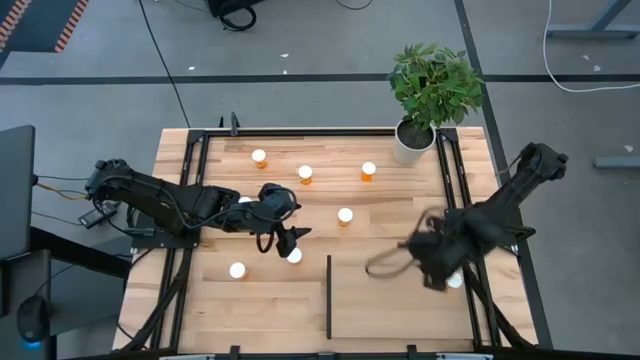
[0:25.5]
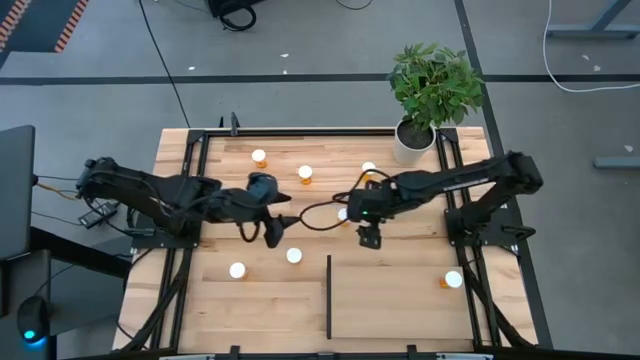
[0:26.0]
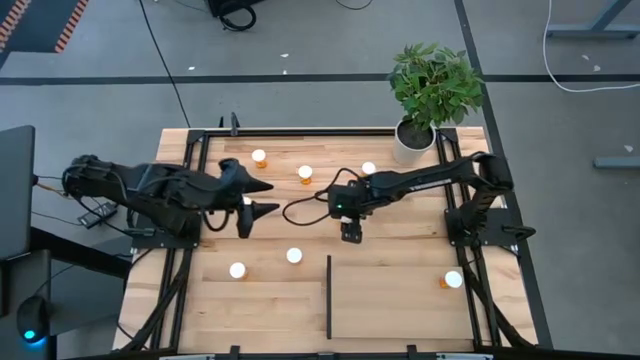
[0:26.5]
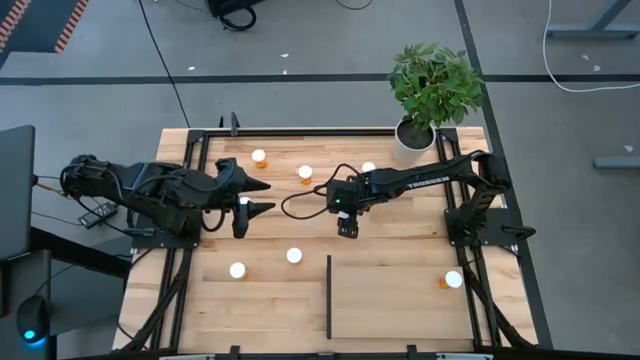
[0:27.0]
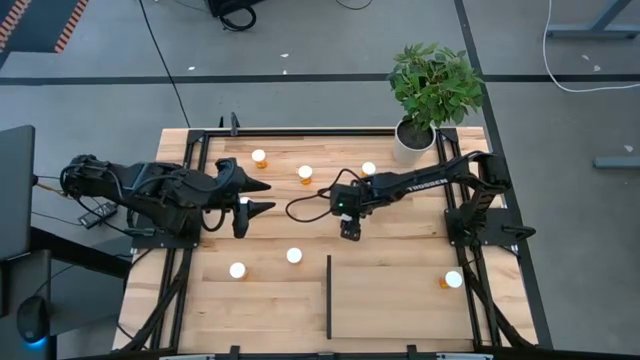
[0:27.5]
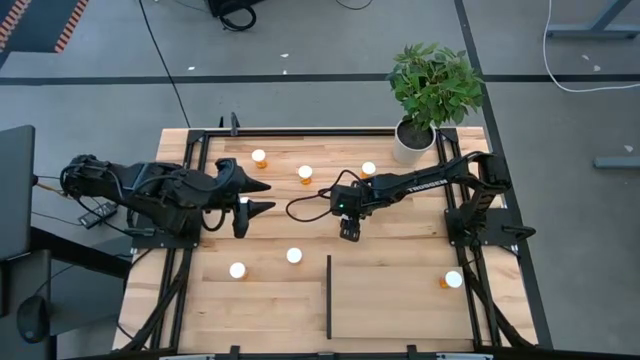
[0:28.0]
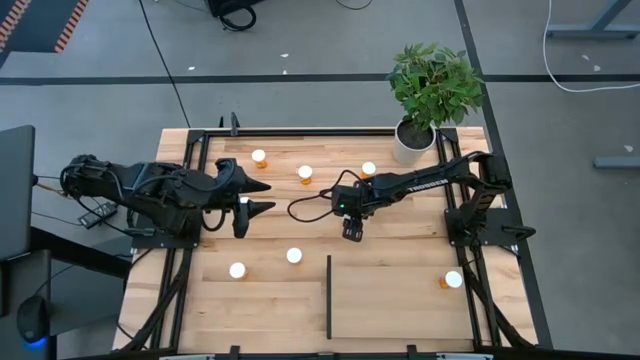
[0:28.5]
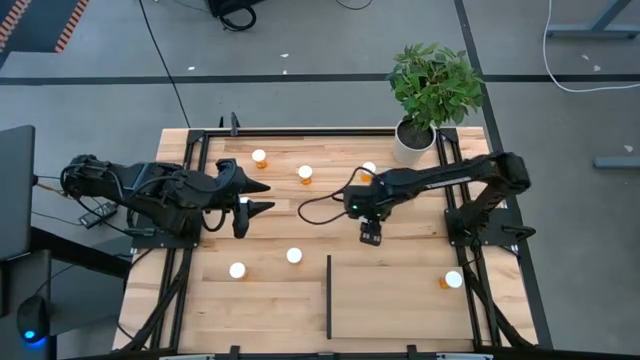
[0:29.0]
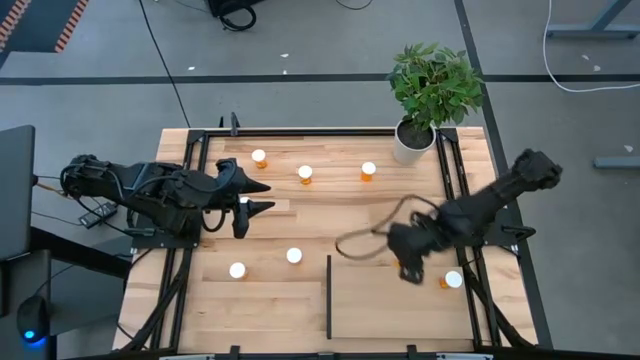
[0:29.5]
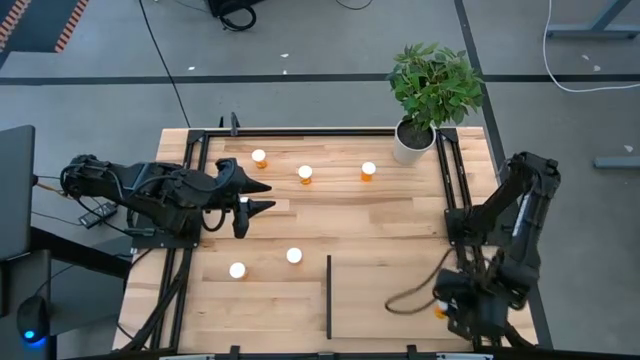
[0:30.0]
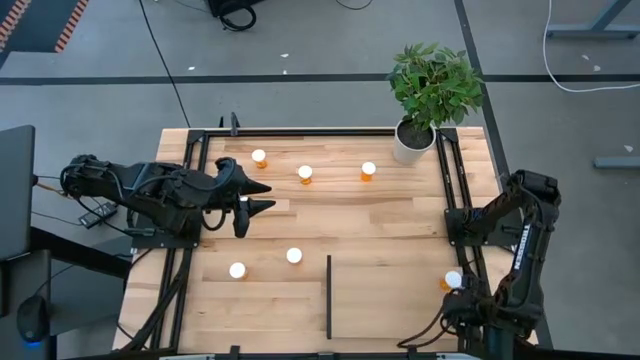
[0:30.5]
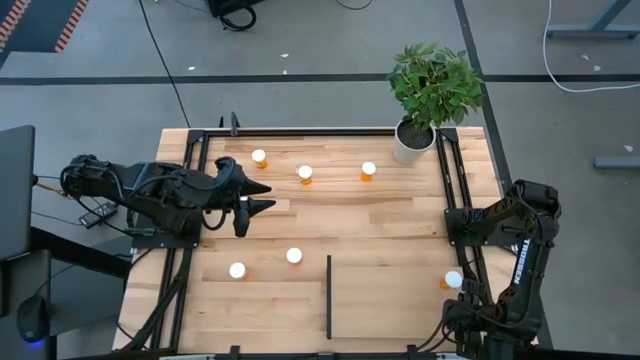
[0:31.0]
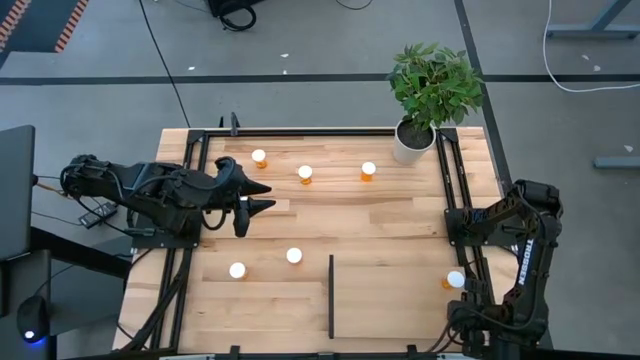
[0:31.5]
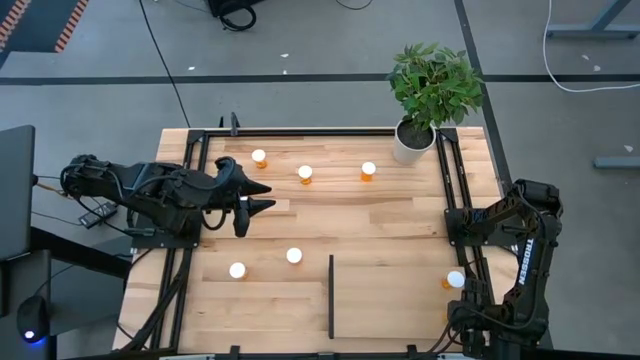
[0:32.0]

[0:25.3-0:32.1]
Task: Pick and place medicine bottles onto shelf by color
Put the orange pill bottle on the shelf aligned with the other orange pill bottle

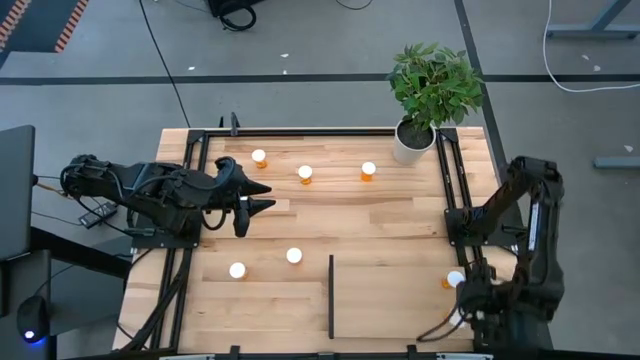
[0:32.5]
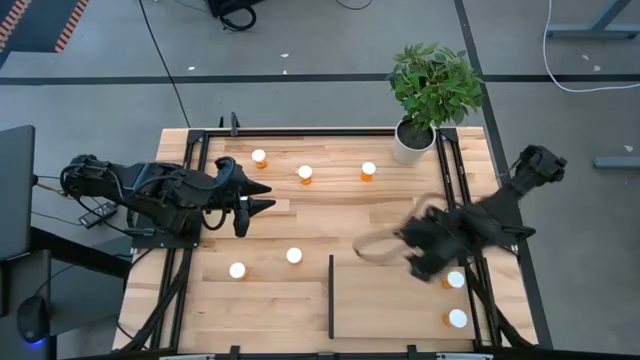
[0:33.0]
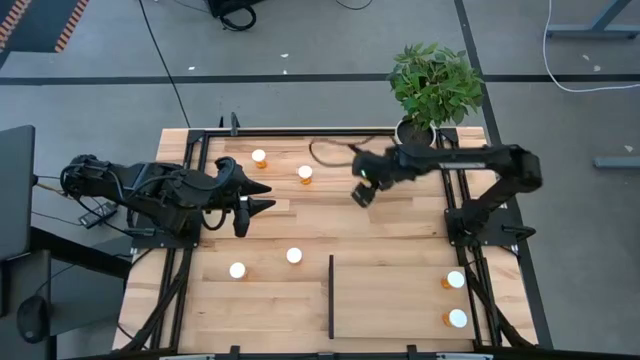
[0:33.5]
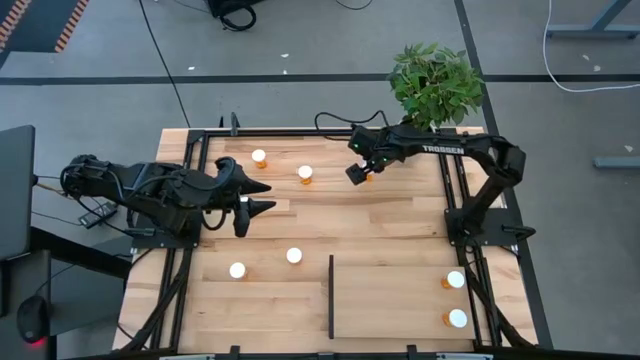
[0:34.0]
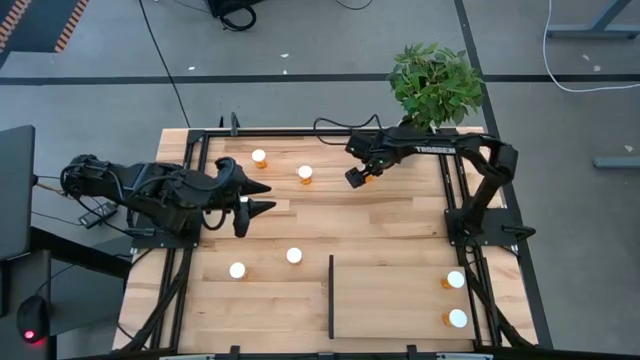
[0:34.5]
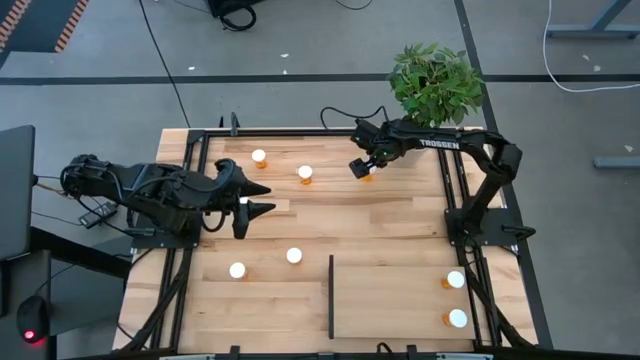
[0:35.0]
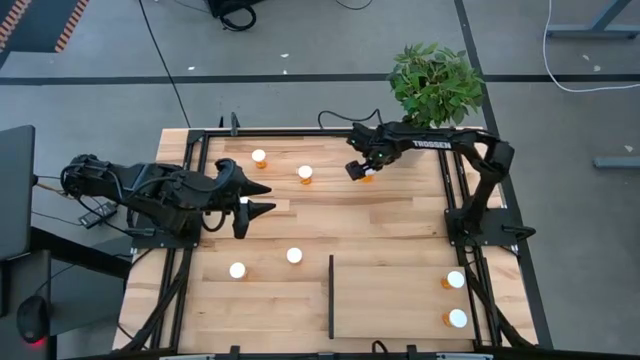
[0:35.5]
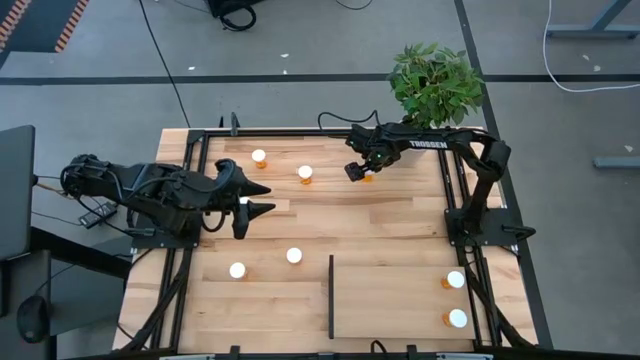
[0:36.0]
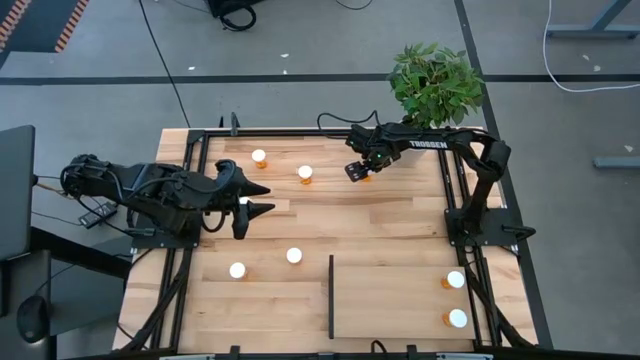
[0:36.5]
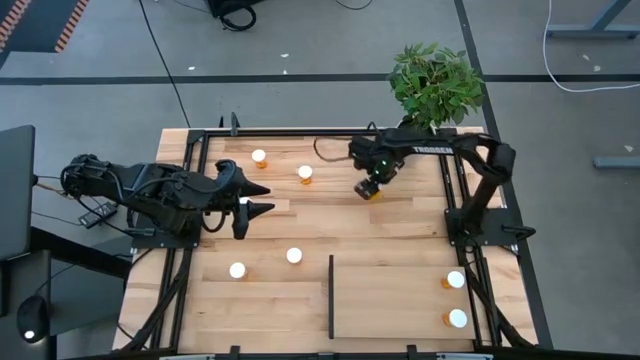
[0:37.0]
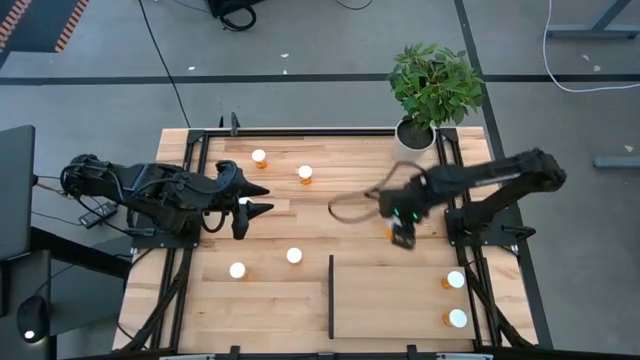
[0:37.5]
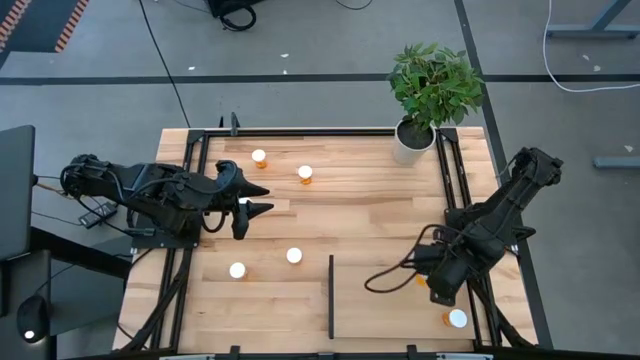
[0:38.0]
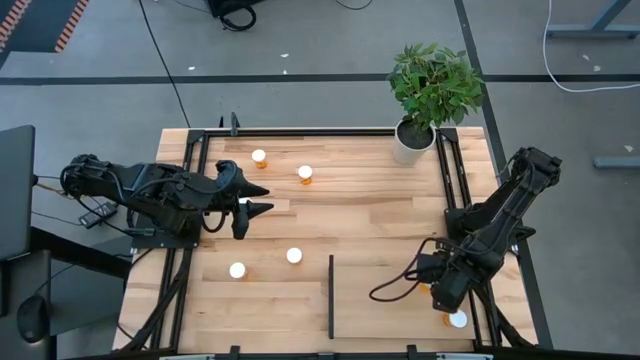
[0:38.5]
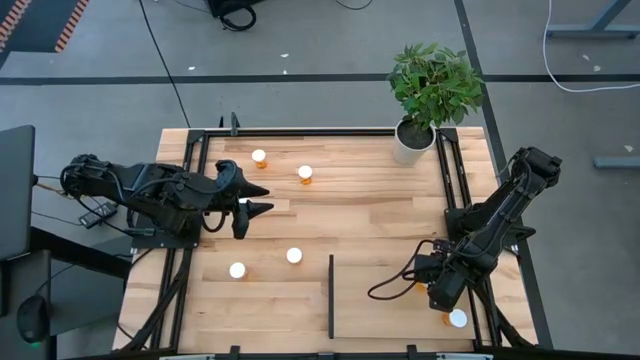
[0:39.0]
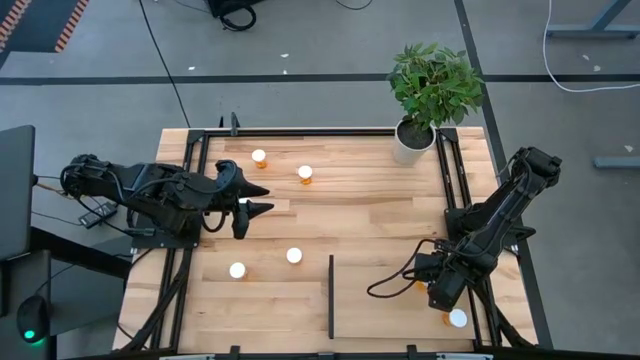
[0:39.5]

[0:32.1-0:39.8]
Put the orange pill bottle on the shelf aligned with the other orange pill bottles

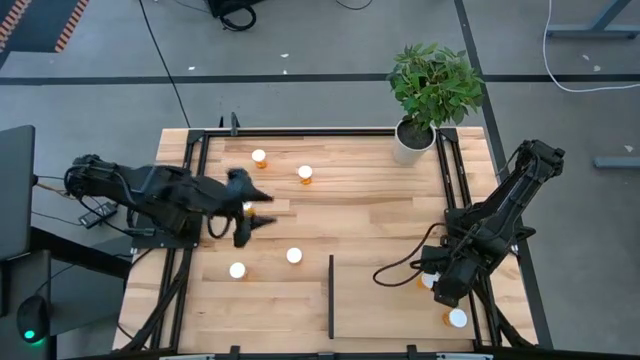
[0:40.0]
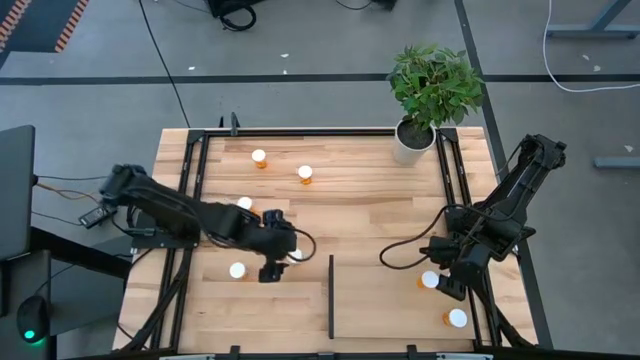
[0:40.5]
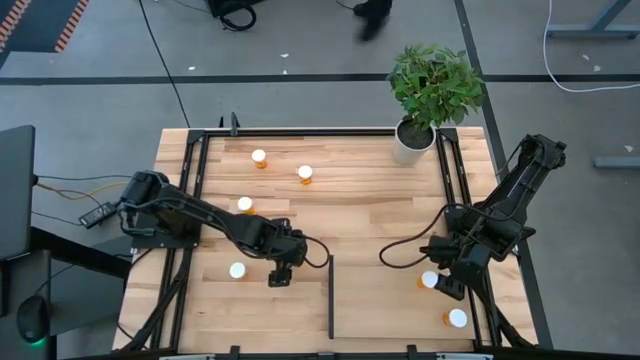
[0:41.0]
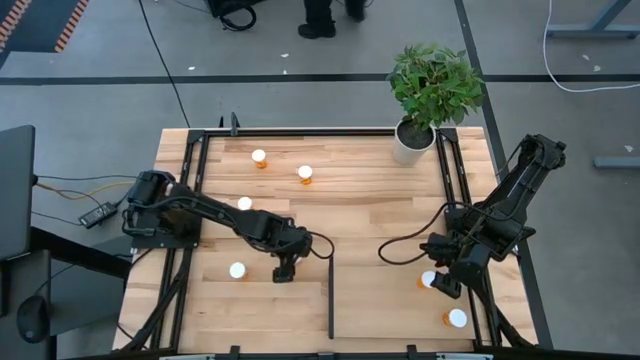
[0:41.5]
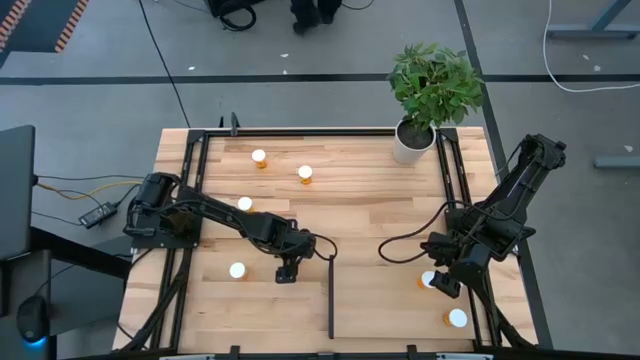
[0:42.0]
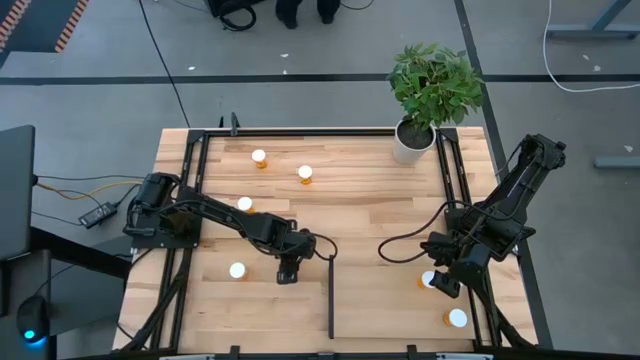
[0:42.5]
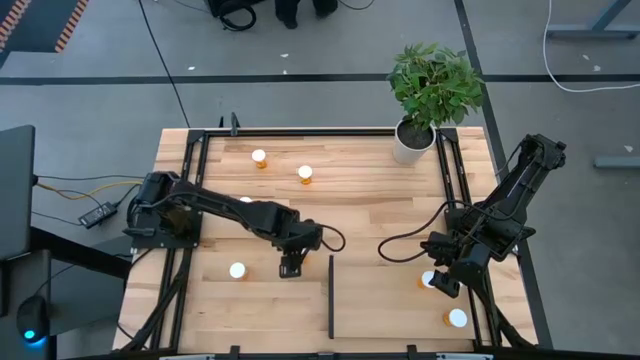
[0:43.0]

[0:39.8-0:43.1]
Put the orange pill bottle on the shelf

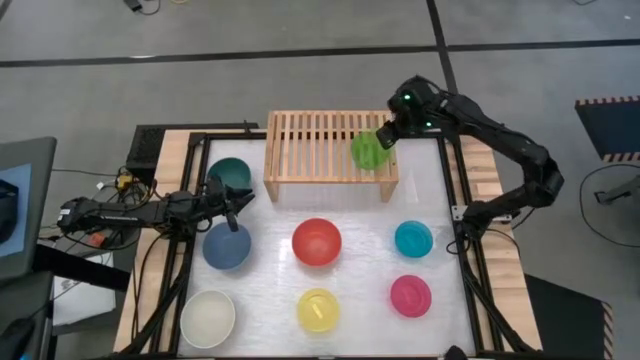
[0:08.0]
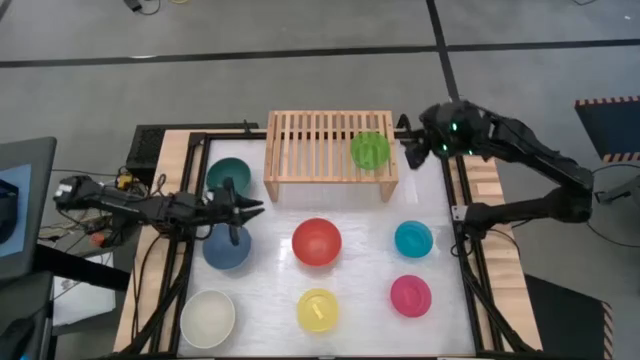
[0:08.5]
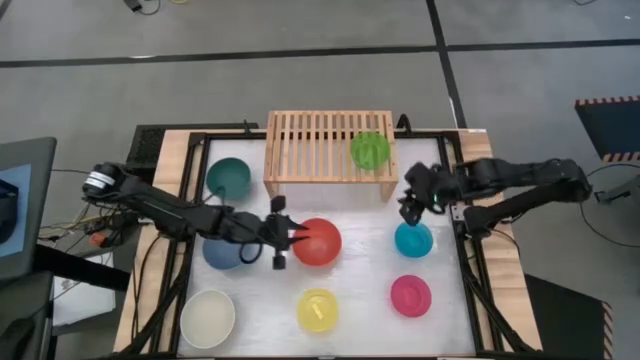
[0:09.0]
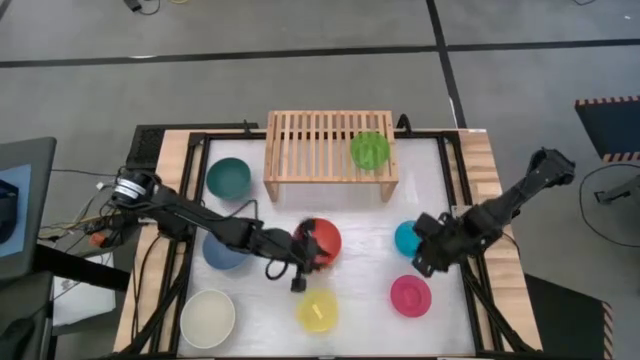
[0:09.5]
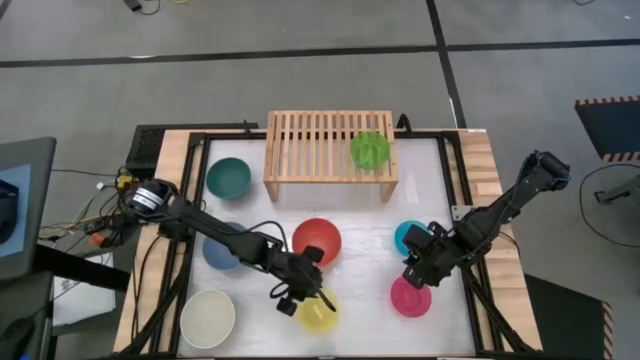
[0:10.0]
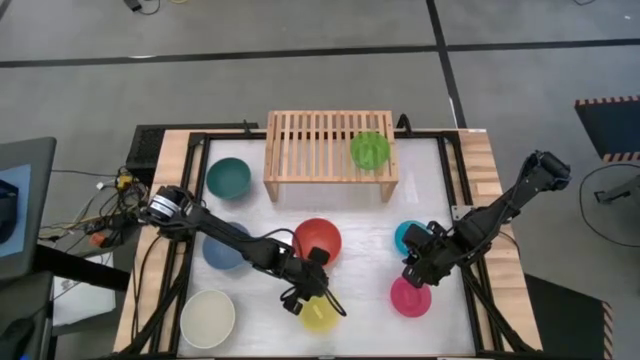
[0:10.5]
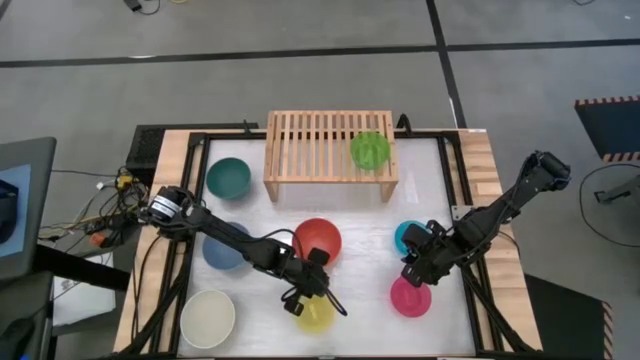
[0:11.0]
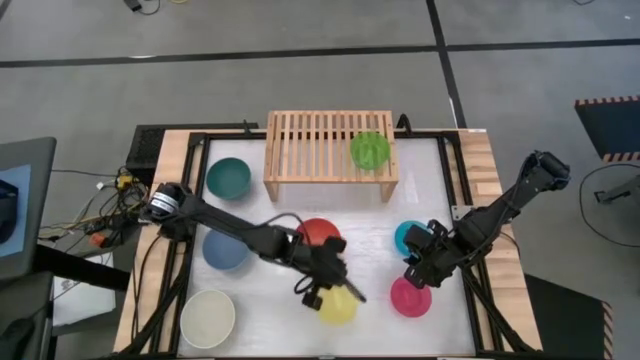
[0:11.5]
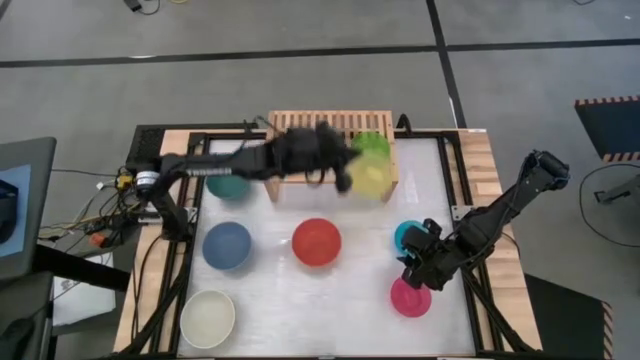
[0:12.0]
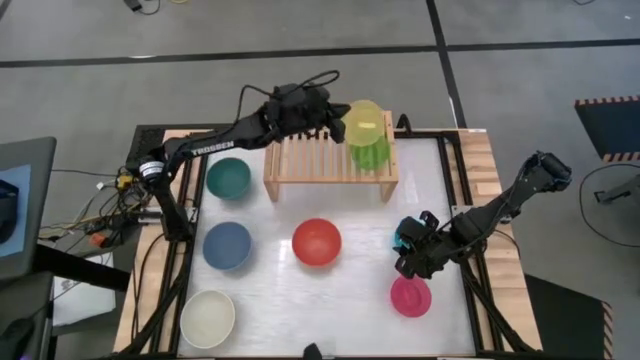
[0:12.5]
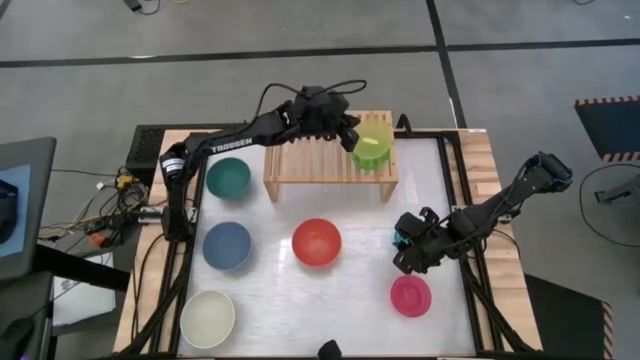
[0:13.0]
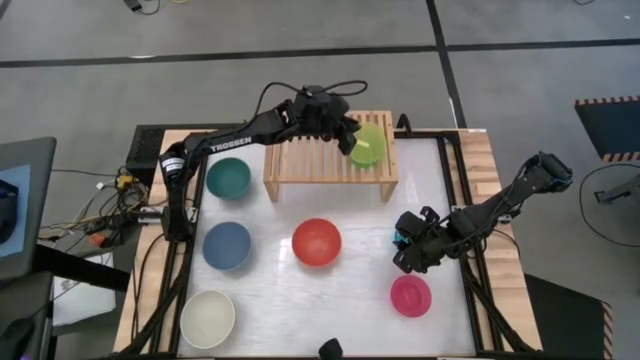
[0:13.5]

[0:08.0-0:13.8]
Task: Place and stack bowls onto a shelf
Stack the yellow bowl on top of the light green bowl on the shelf
